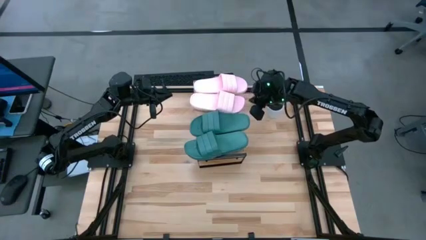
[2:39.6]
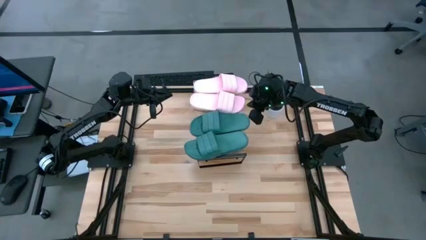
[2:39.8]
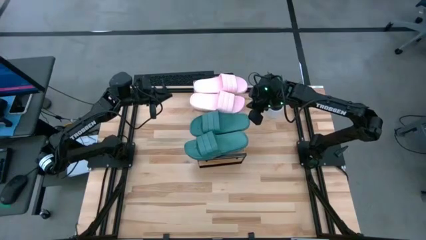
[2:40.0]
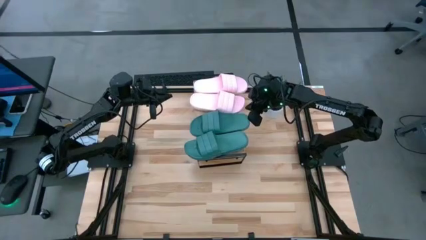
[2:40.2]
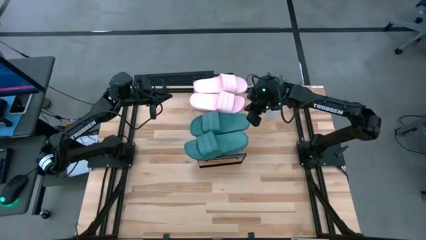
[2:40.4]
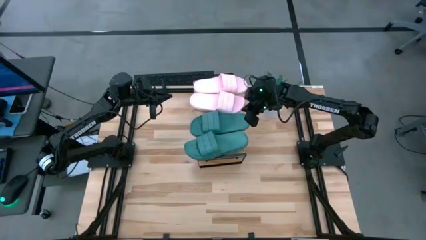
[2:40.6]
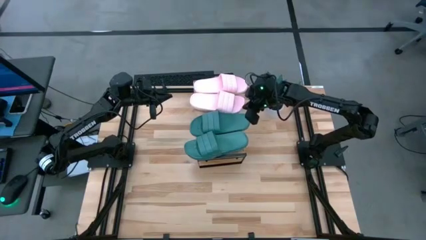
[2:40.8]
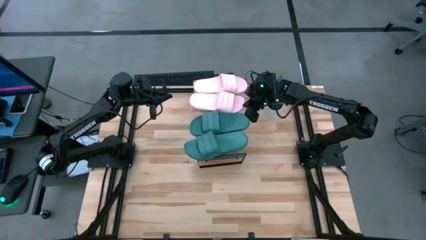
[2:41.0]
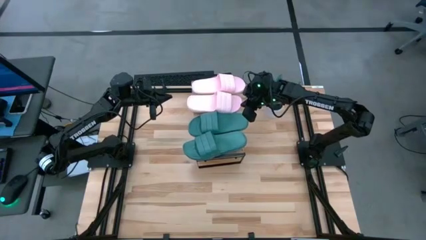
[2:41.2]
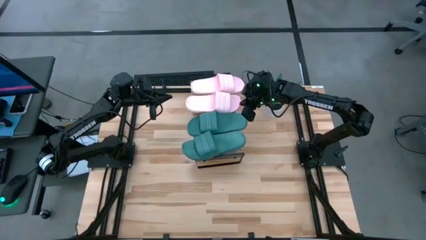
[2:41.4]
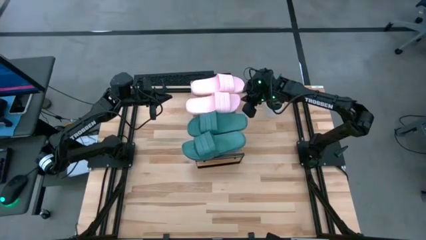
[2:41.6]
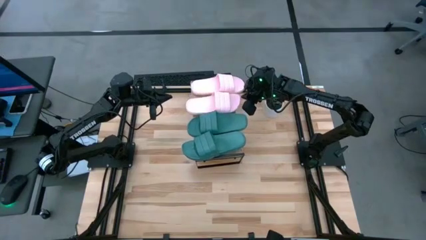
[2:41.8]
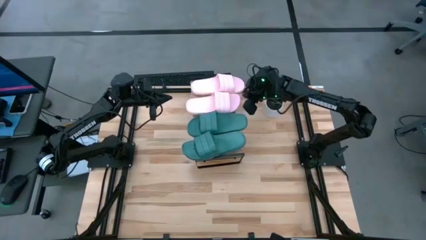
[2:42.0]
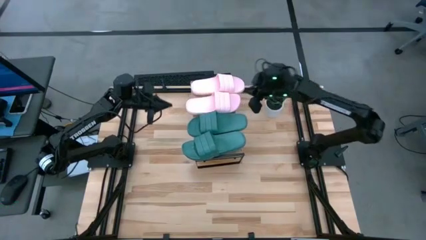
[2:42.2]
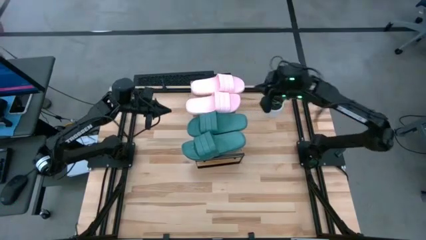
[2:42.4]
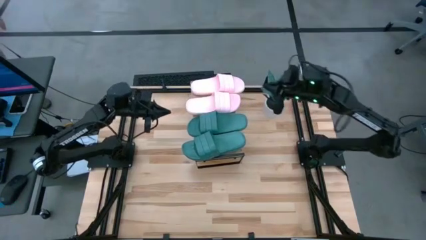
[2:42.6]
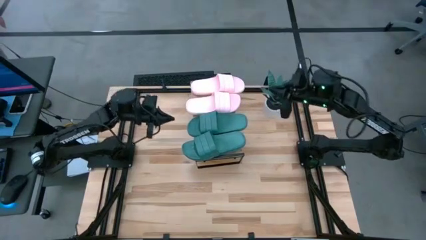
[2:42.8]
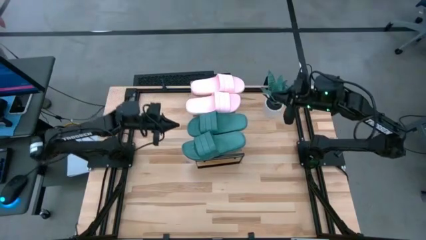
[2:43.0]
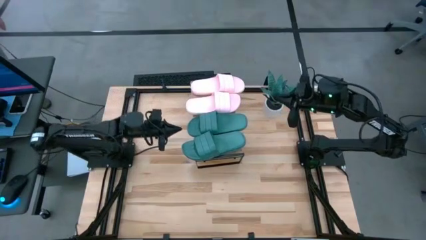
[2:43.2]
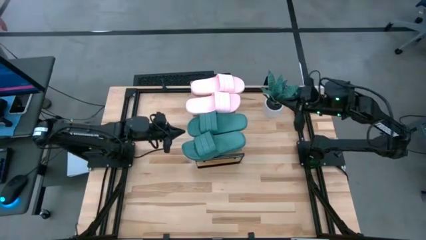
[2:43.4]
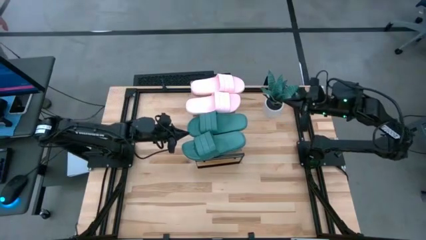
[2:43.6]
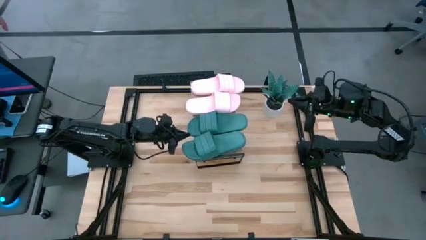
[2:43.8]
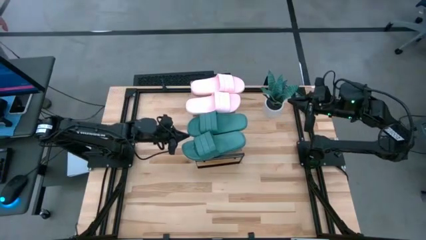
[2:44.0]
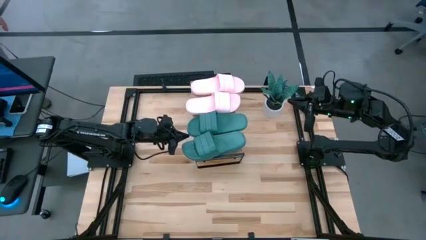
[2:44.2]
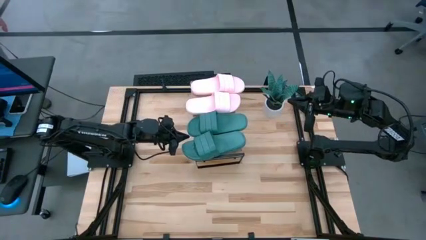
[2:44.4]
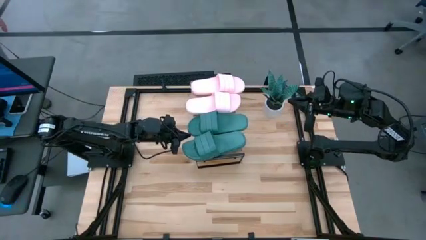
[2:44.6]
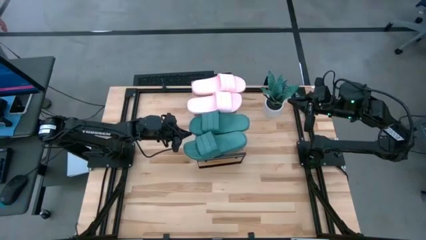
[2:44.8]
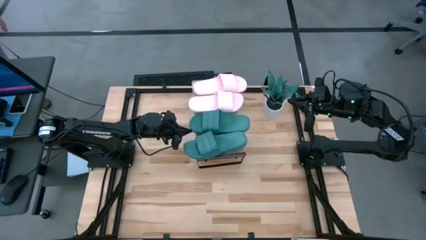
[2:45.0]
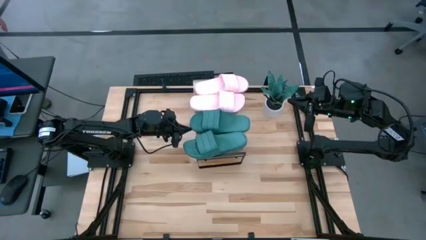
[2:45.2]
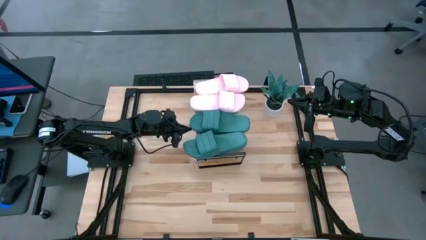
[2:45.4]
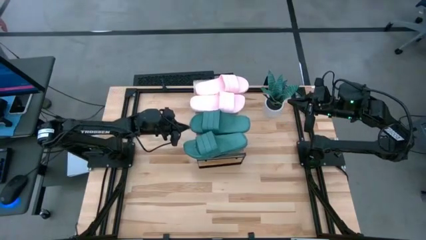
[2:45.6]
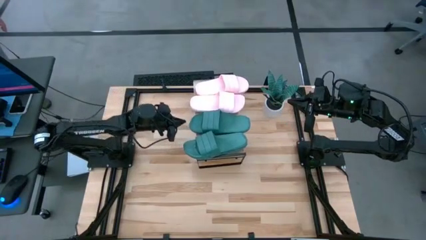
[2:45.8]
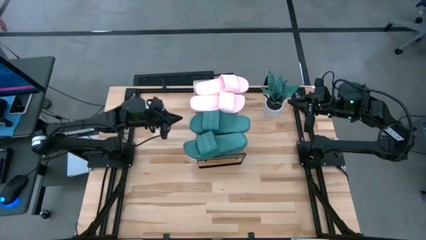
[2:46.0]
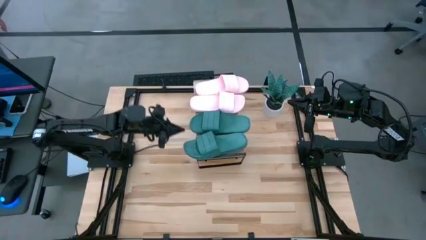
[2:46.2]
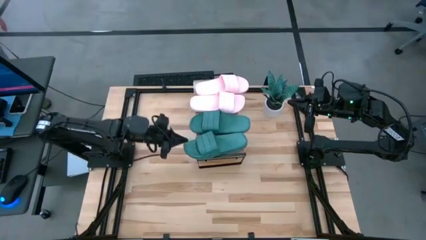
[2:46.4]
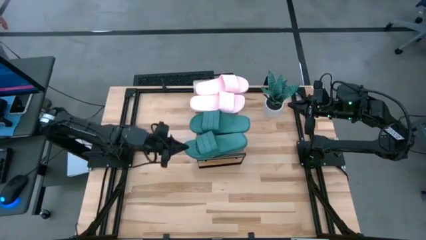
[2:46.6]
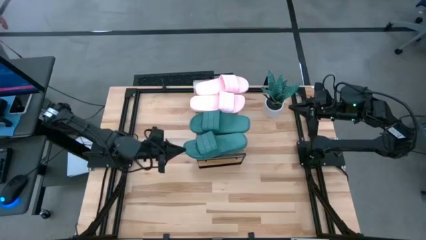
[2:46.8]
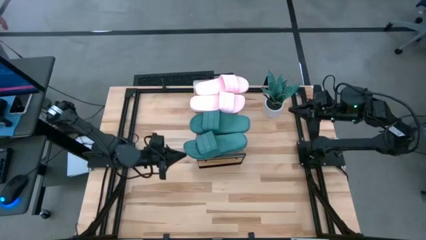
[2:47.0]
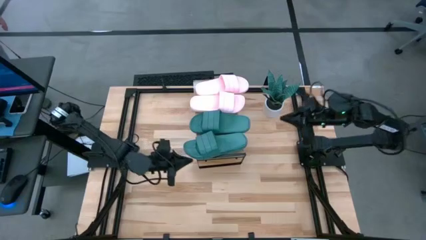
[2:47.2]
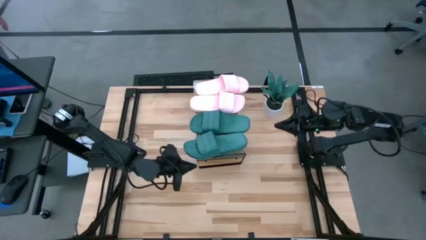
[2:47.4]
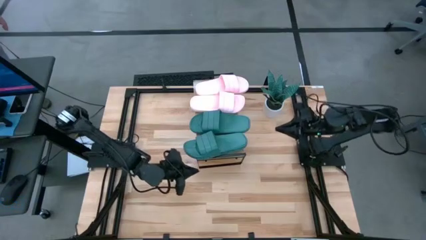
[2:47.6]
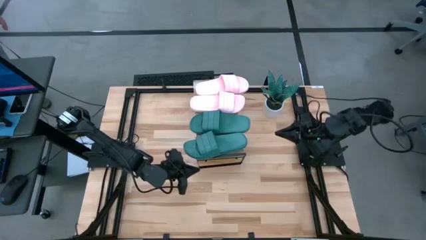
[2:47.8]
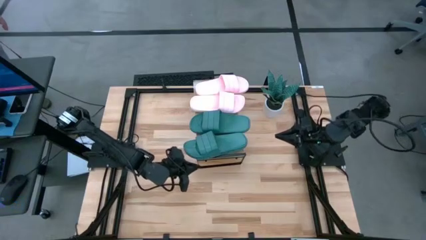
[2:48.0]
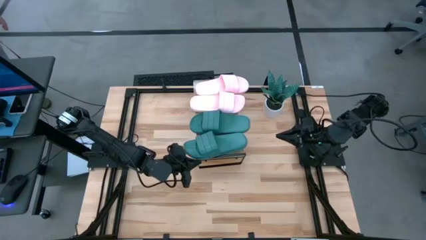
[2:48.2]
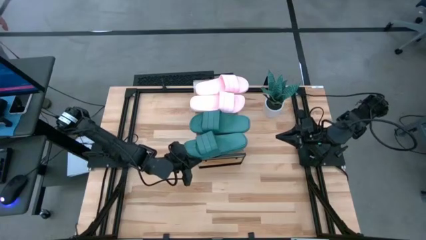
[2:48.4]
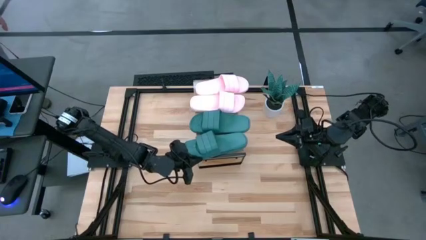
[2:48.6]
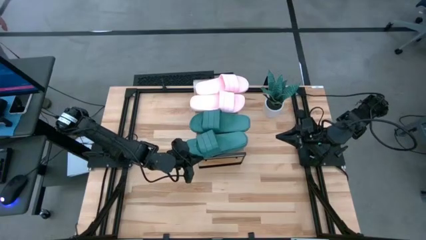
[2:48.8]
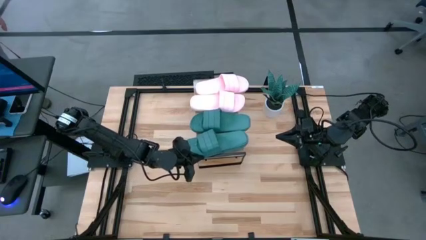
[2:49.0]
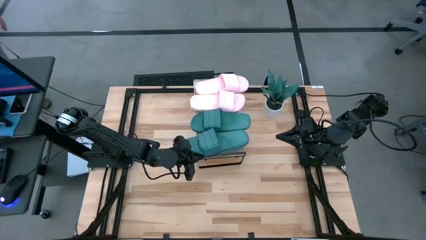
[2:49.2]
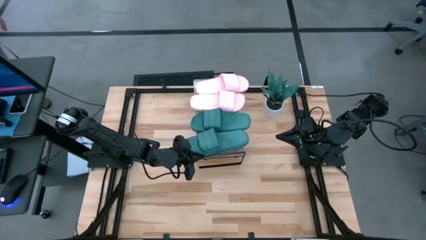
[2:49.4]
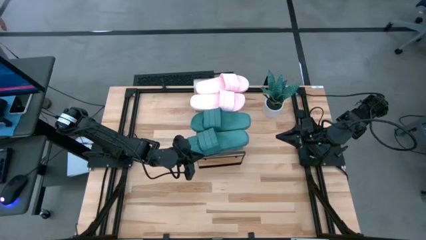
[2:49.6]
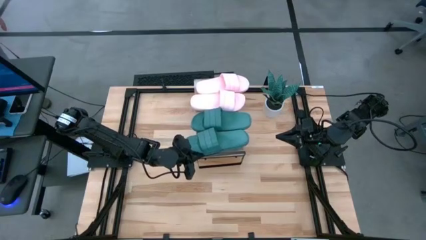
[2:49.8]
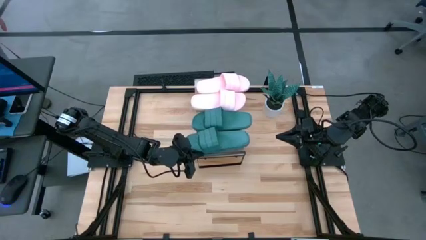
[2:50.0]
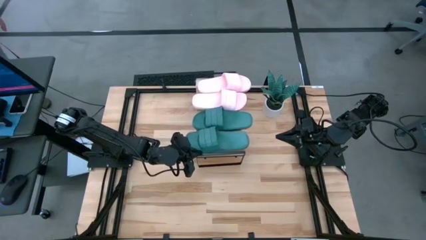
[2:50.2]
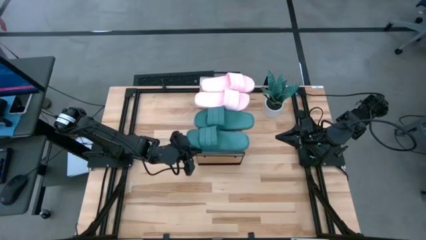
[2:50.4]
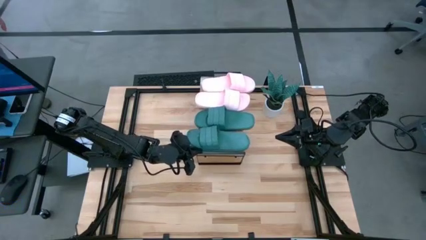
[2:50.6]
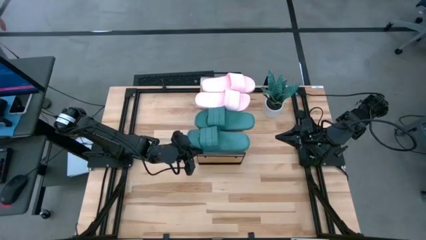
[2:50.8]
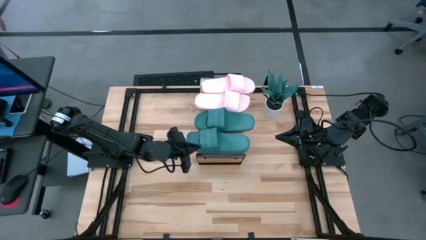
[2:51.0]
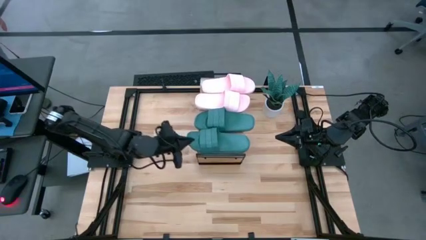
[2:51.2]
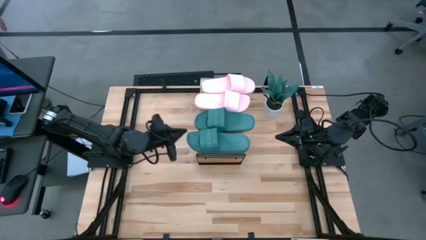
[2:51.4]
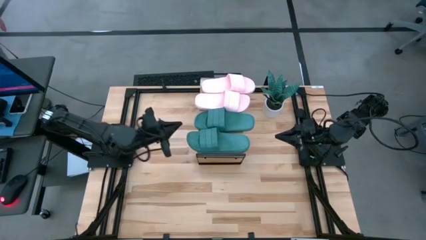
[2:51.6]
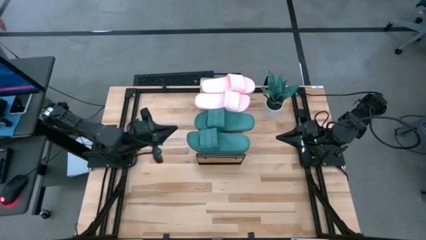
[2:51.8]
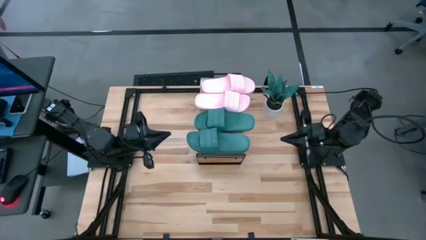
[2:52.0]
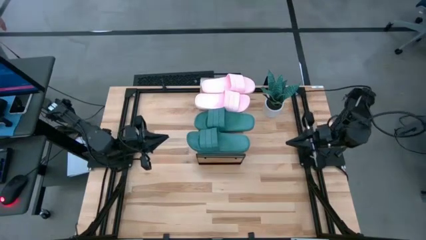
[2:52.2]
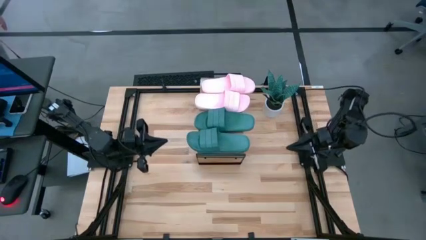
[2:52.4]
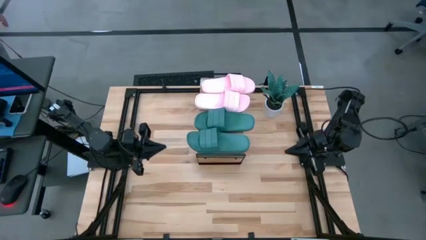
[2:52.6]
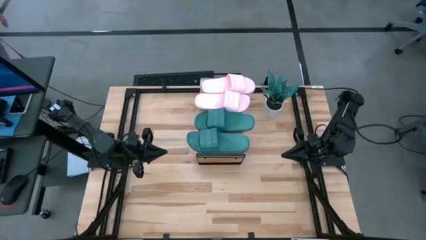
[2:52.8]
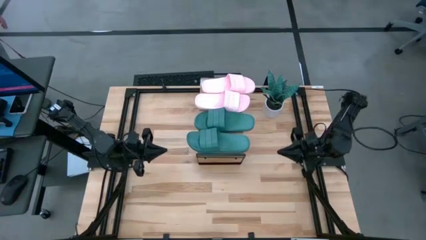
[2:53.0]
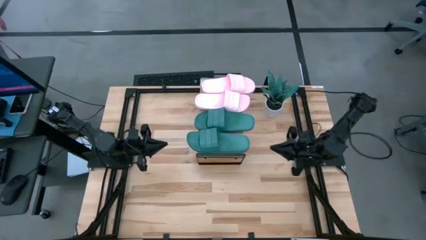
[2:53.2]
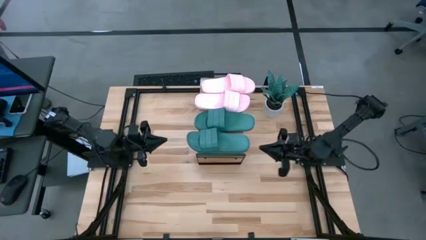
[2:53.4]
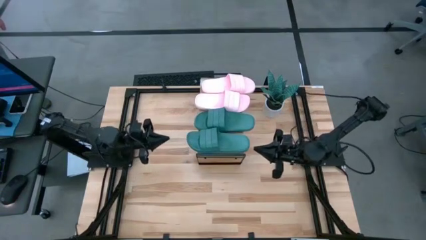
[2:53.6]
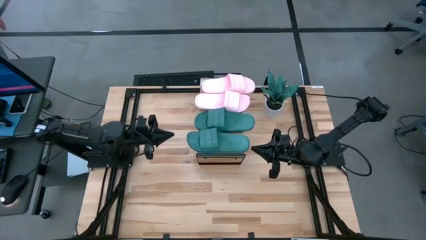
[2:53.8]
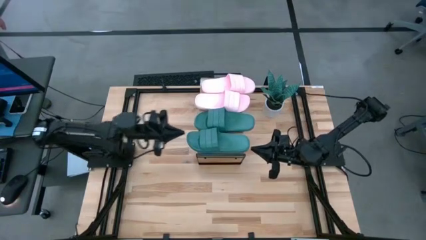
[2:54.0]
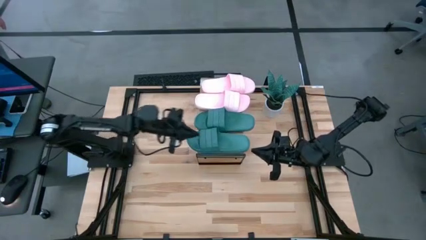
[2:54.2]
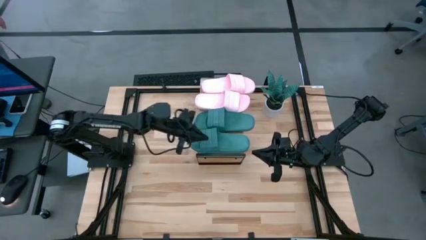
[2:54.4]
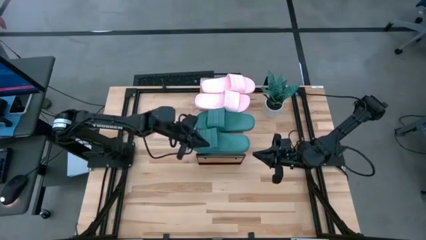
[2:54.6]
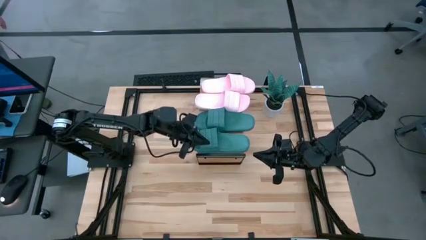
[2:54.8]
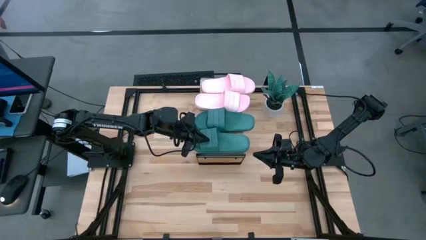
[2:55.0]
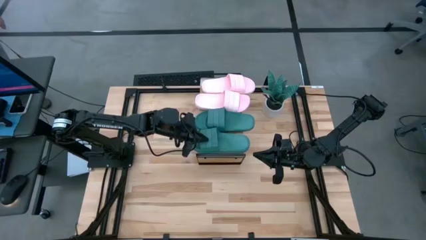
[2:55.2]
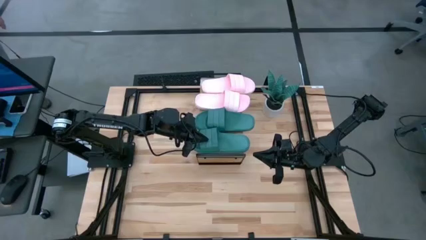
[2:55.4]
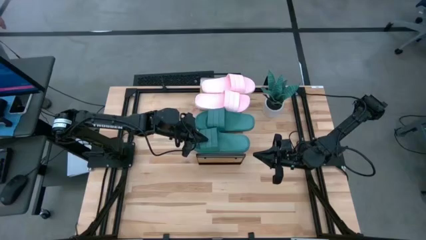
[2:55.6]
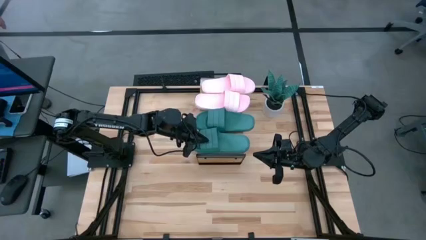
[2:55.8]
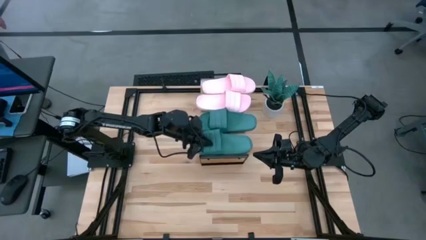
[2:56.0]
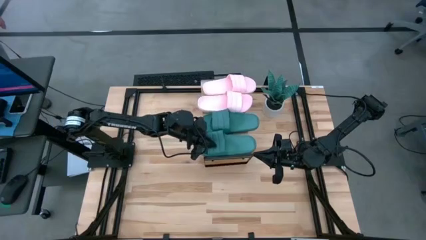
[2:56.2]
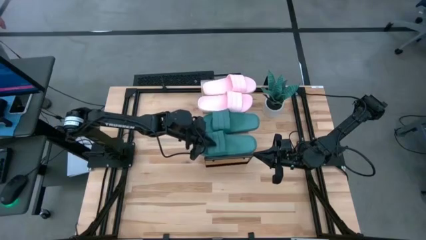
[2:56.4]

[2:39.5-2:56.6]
Task: Pick and place slides into the shelf
Adjust the slides on the shelf
